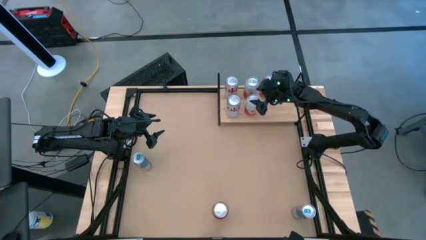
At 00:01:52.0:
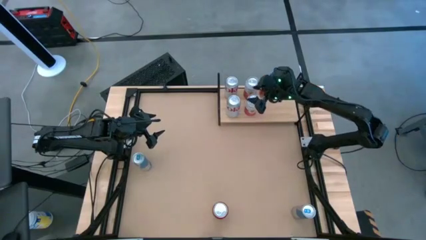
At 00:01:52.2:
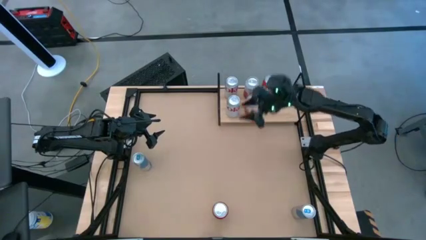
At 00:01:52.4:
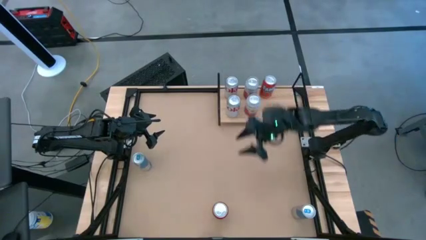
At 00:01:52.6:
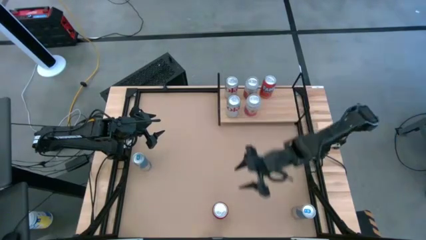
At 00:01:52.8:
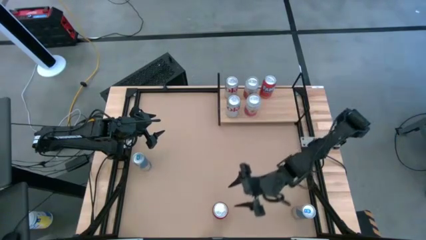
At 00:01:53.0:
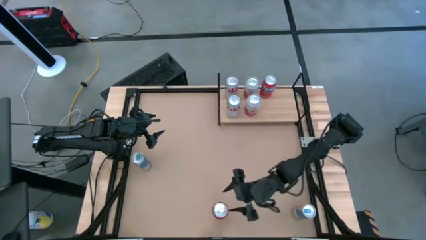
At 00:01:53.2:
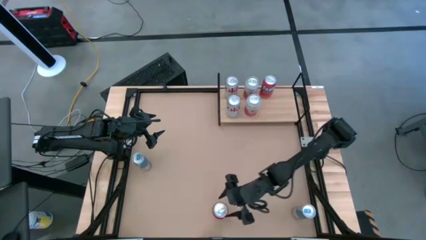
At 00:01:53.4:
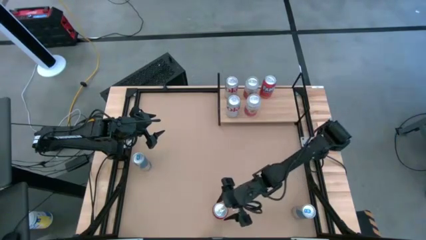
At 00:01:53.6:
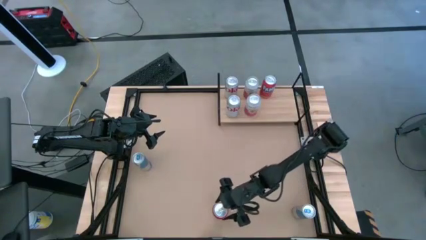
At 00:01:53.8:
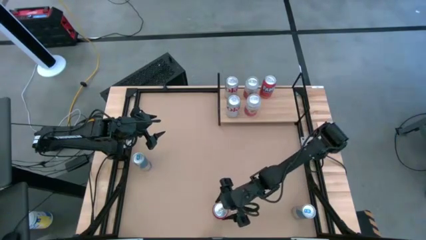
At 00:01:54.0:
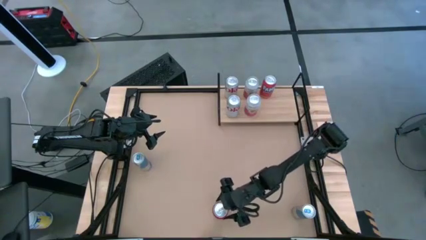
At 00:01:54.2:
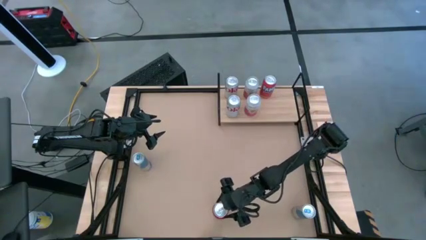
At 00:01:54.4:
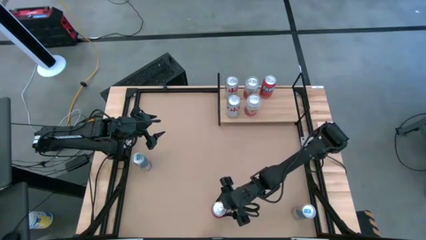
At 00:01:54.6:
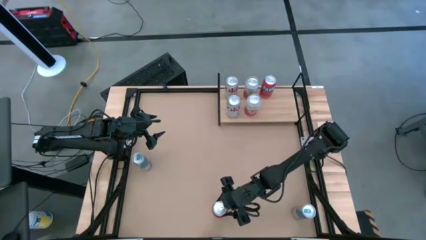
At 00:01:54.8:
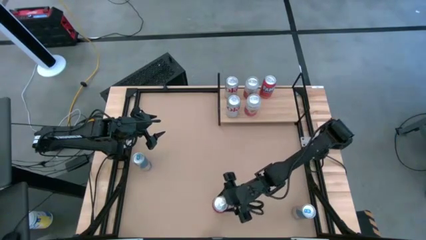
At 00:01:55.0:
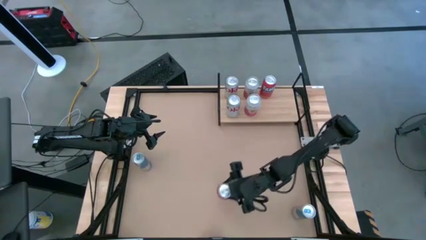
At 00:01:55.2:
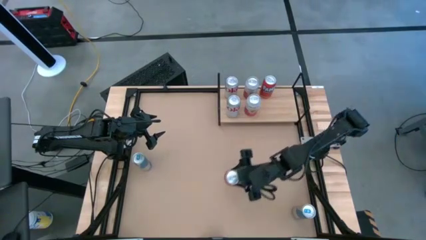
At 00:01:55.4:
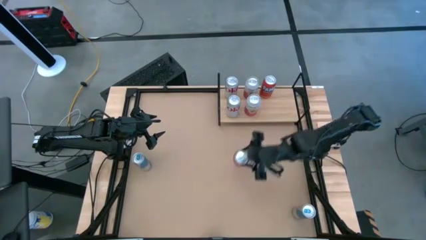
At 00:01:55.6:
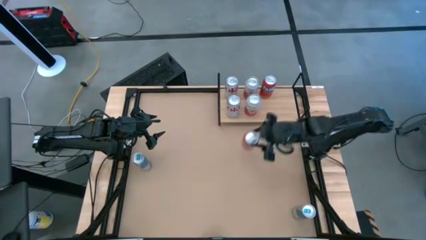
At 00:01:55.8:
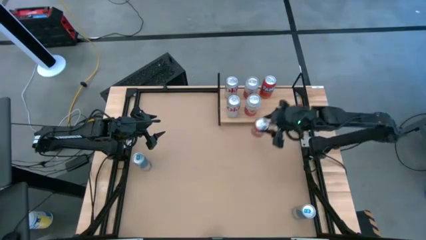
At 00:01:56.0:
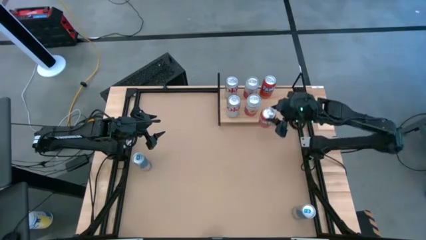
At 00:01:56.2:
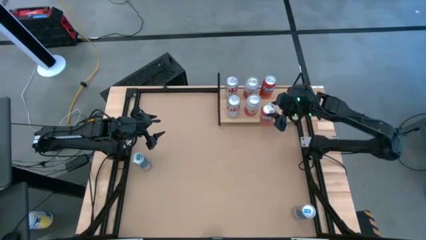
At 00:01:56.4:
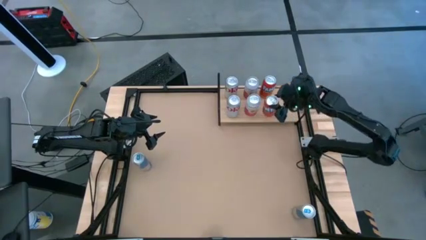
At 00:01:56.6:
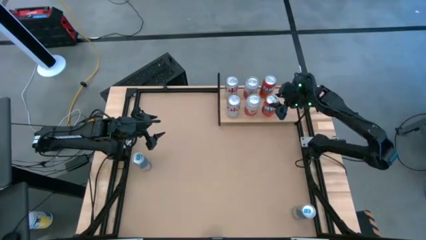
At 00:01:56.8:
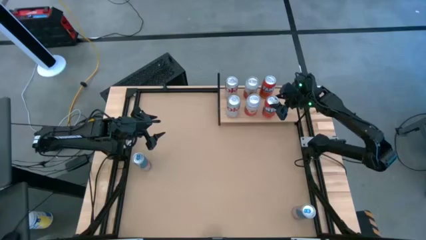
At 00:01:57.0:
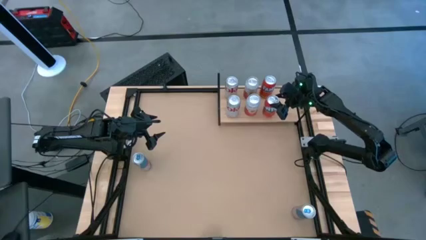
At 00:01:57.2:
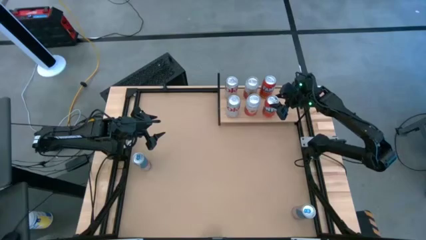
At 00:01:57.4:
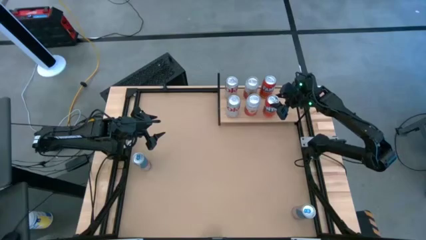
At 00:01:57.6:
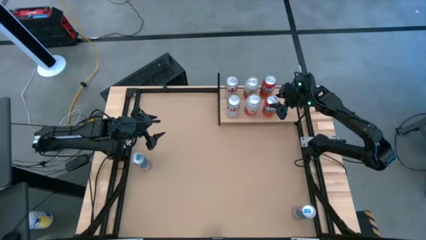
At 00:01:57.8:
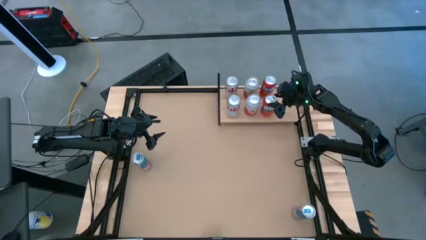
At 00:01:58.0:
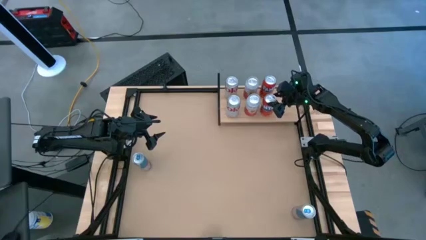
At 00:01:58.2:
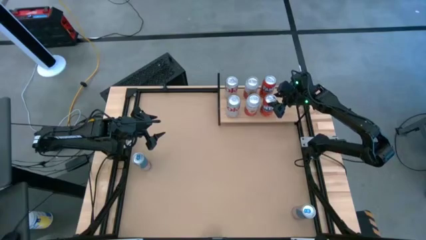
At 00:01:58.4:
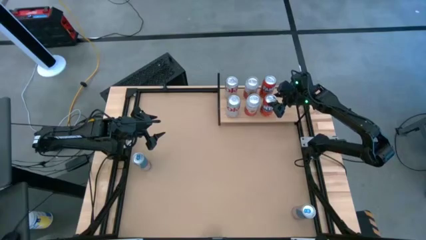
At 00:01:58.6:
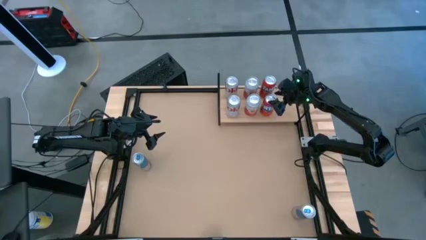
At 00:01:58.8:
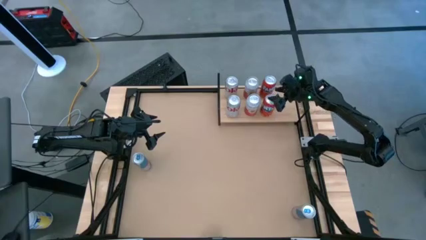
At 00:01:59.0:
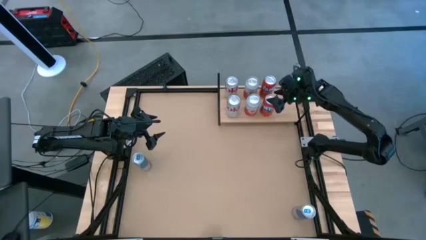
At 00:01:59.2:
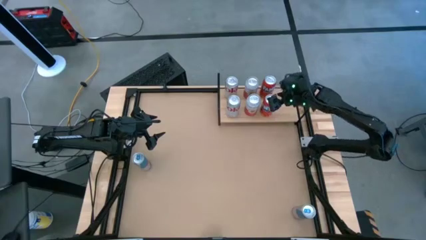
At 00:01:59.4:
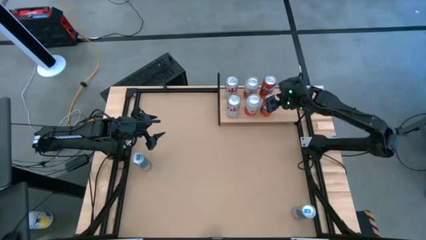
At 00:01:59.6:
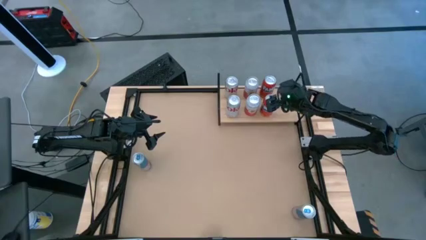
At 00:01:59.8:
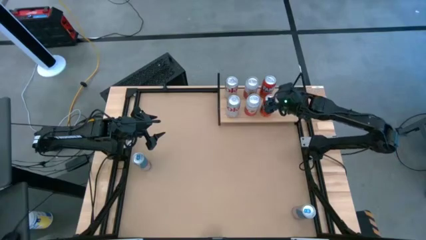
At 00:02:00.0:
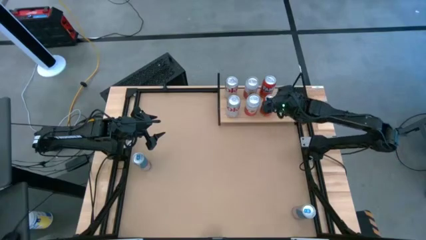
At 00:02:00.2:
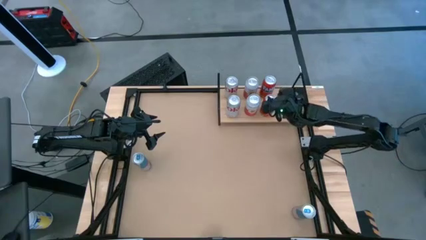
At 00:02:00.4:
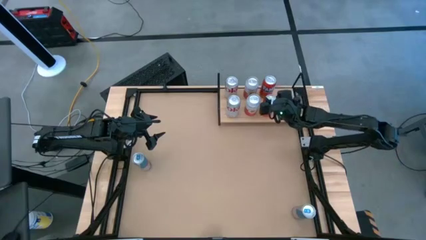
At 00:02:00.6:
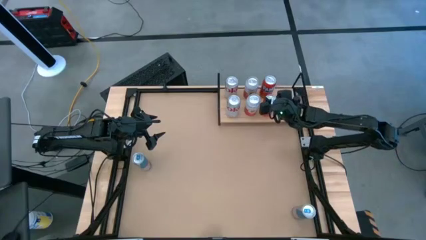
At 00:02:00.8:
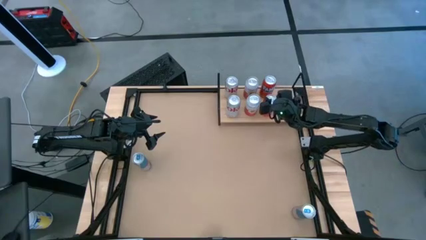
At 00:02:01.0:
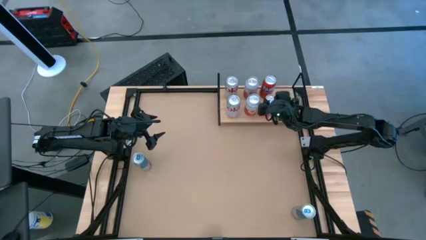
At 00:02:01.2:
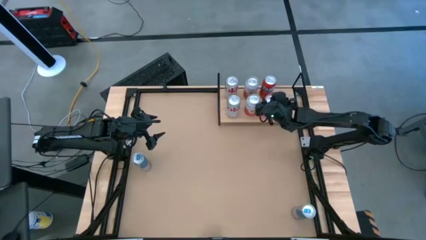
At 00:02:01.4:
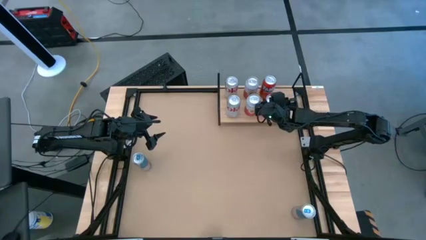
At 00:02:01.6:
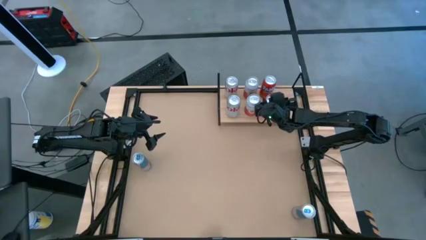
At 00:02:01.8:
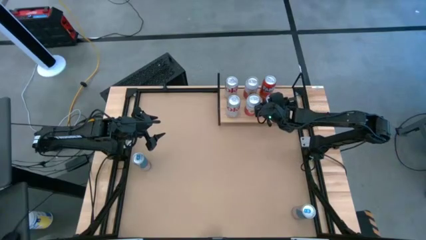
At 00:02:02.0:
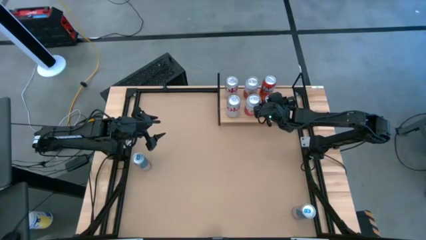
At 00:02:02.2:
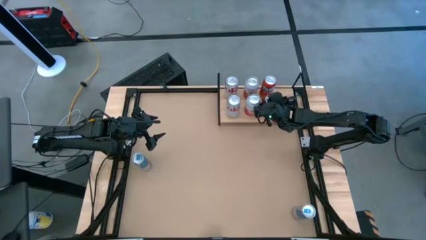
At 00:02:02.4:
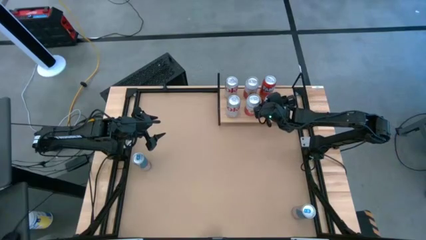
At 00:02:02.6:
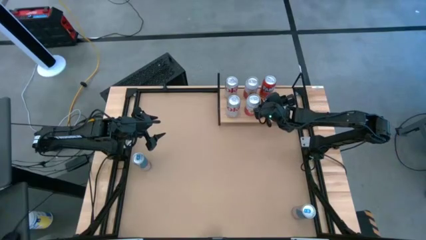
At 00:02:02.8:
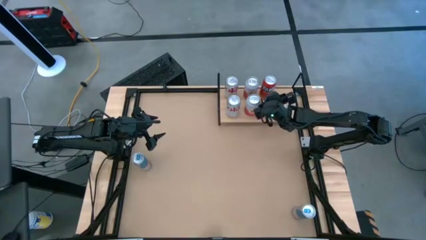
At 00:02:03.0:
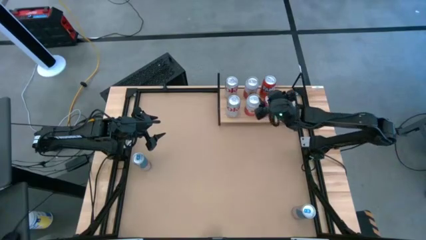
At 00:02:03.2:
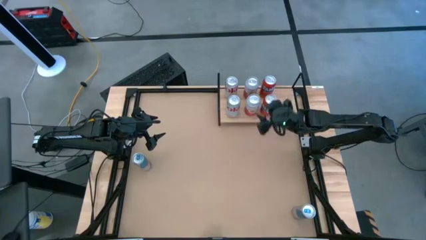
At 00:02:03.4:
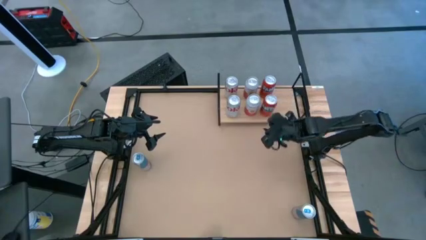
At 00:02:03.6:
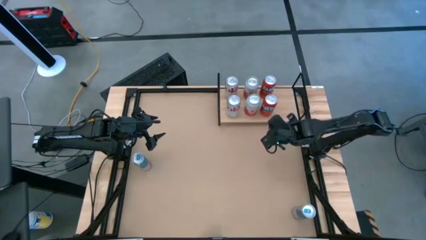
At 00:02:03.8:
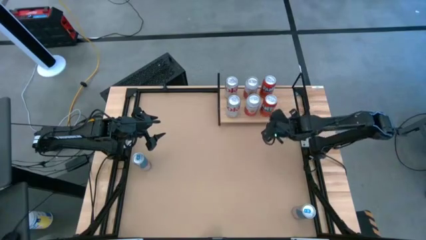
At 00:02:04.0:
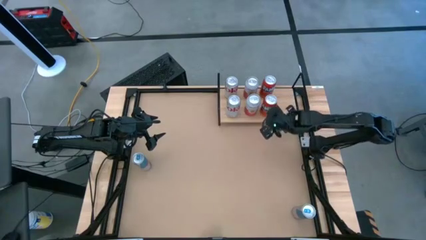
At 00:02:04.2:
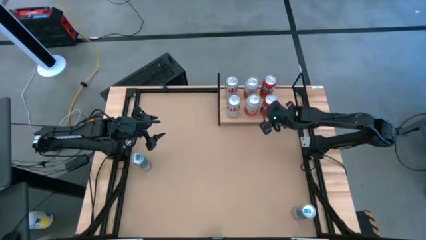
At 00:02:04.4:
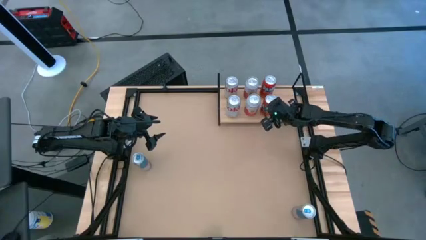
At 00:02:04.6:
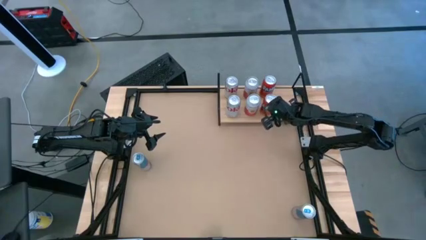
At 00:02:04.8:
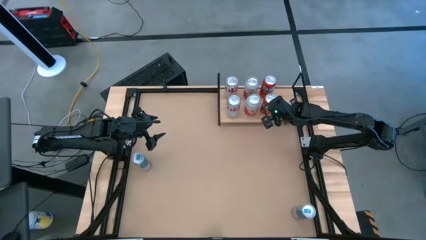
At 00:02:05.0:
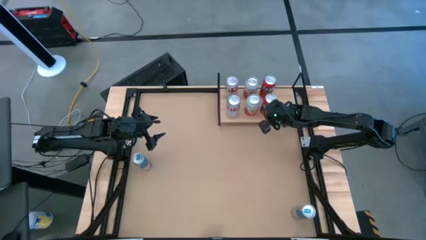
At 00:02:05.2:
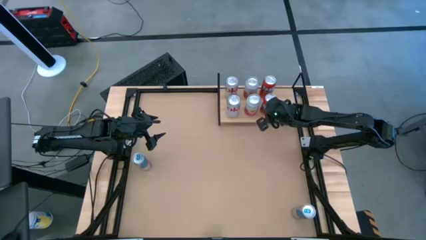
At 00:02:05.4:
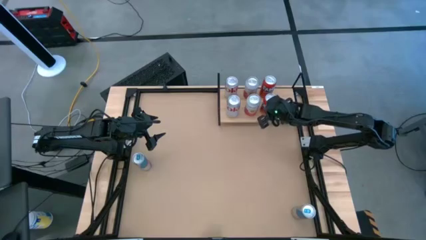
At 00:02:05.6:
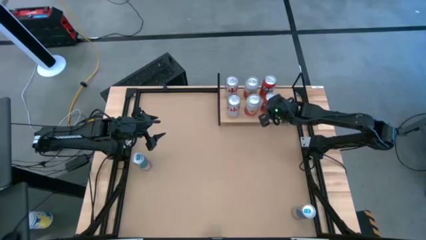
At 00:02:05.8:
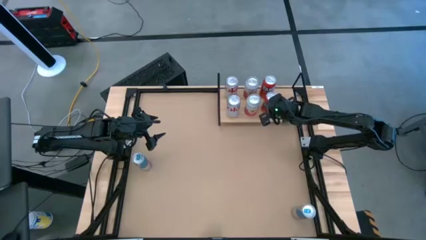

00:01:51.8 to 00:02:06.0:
Task: Place canned beverage on shelf
Put the orange soda can on the shelf

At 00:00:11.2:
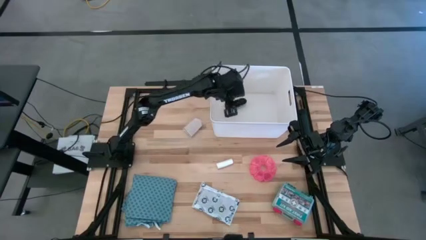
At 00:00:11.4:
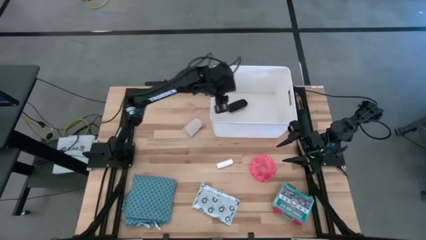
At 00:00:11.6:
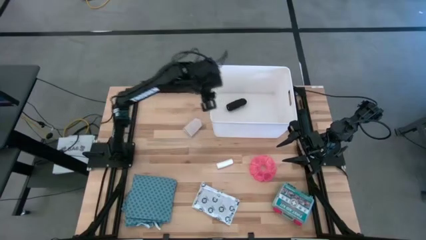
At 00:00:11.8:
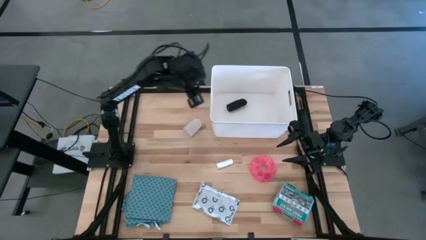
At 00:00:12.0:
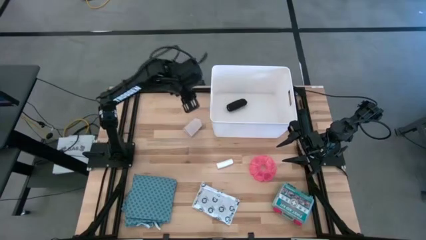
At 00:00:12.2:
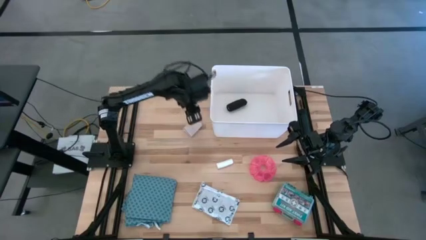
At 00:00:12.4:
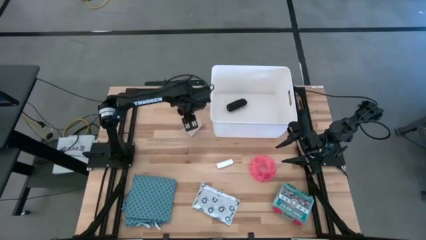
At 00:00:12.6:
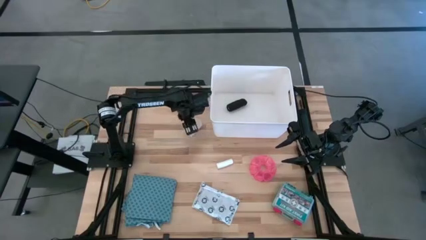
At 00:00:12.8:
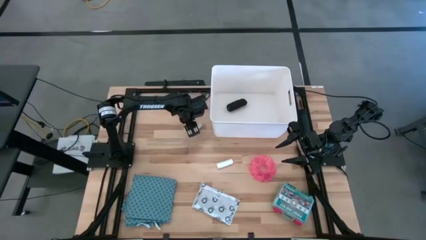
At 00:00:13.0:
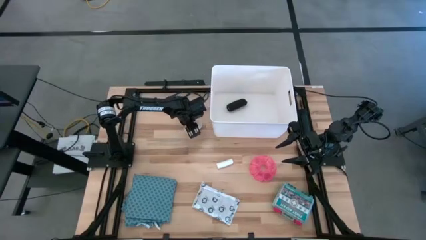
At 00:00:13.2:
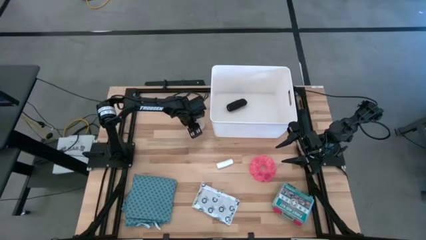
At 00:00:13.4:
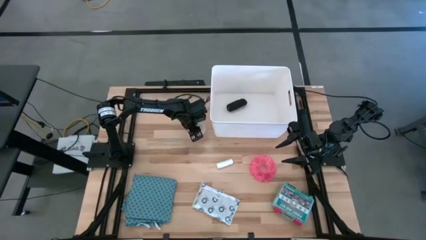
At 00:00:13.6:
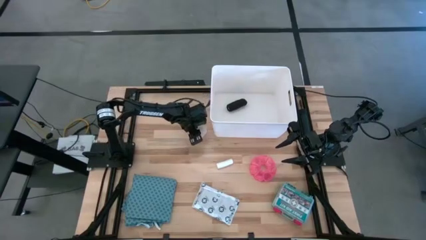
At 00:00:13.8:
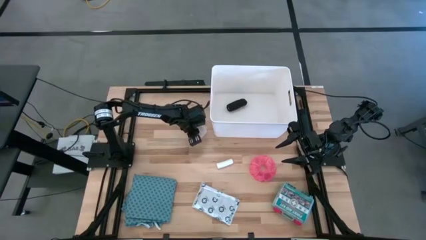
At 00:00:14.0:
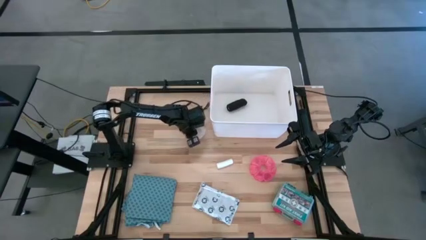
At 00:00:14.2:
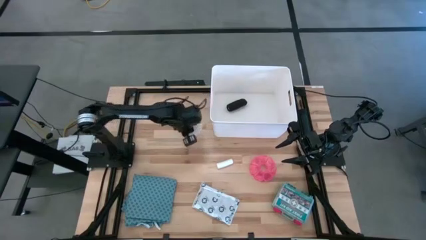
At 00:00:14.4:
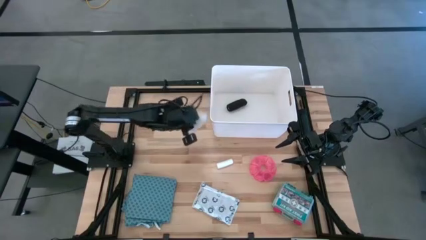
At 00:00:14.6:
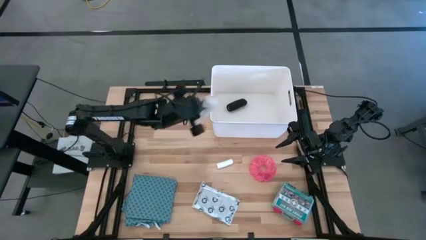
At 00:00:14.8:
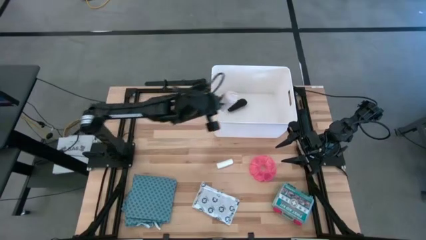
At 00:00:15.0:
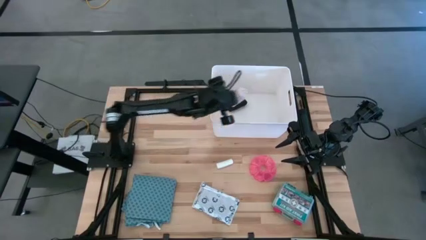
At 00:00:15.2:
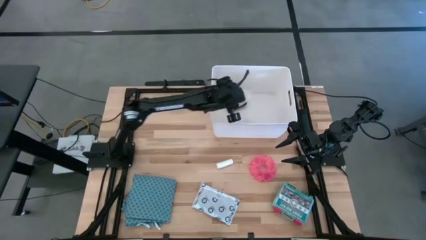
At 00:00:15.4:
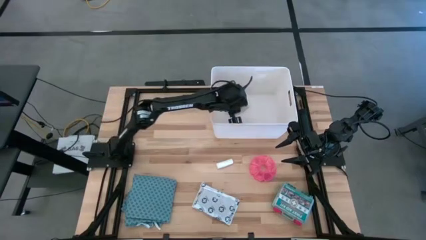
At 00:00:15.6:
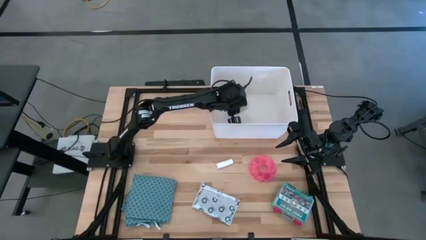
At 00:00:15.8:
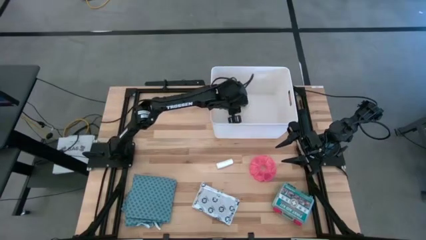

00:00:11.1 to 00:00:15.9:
Task: Pick & place medical supplies in basket/bin
Put the white bandage in the white bin
